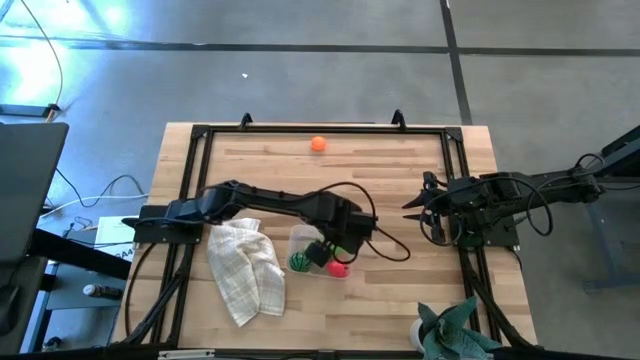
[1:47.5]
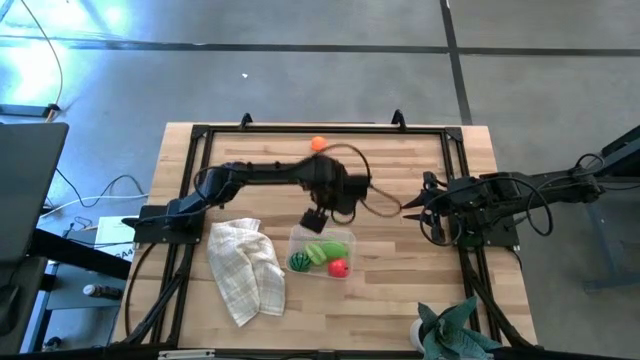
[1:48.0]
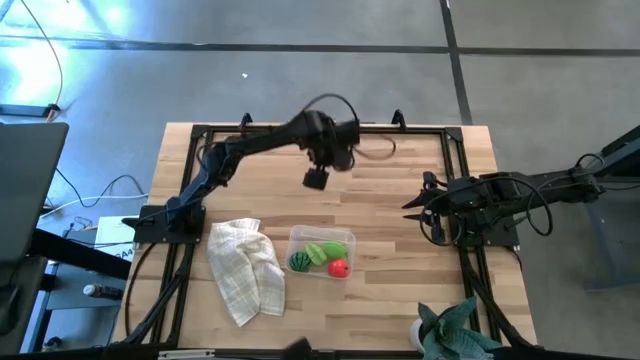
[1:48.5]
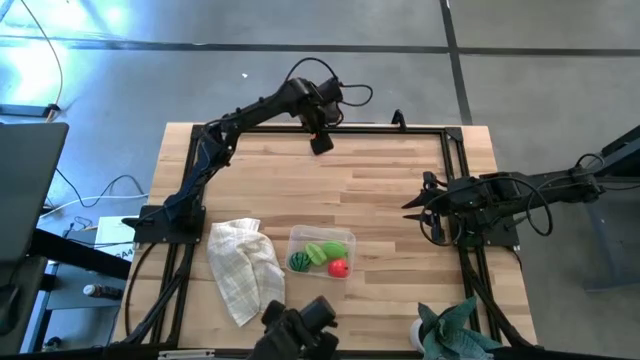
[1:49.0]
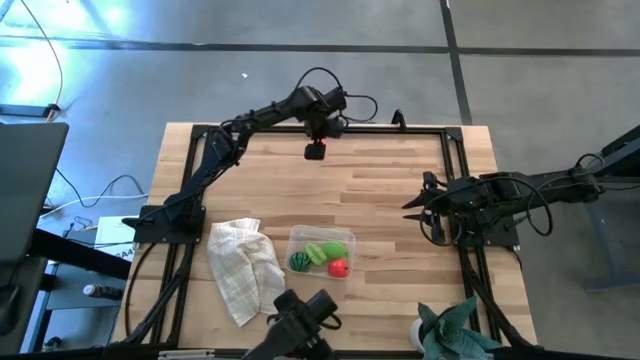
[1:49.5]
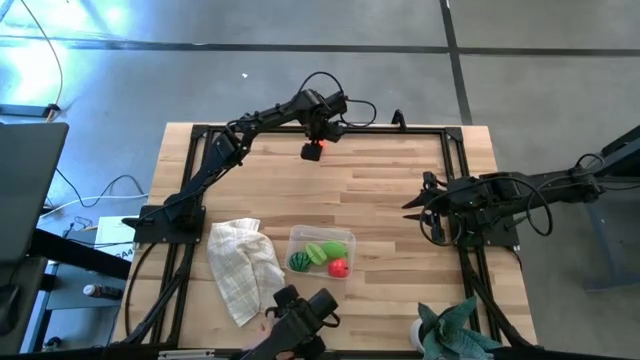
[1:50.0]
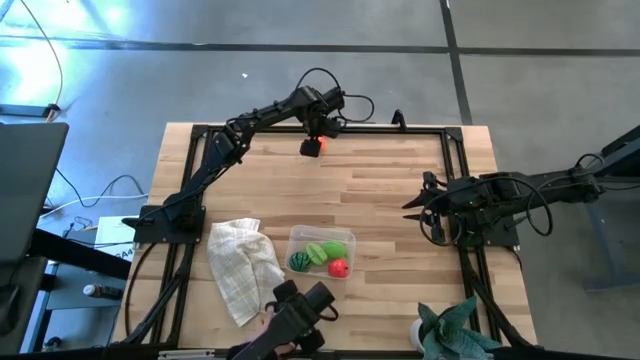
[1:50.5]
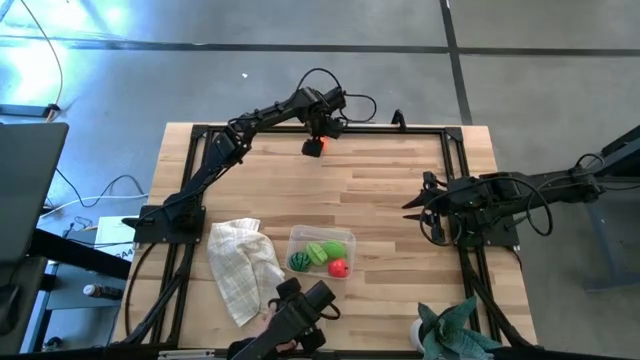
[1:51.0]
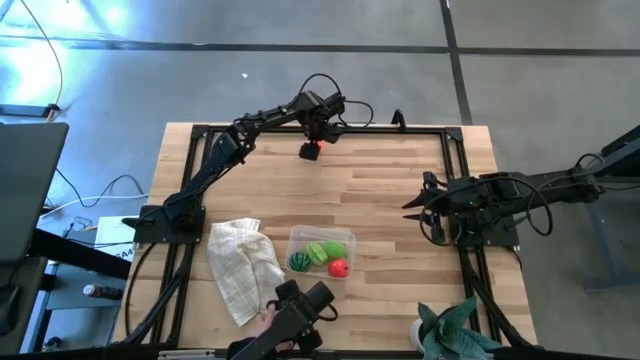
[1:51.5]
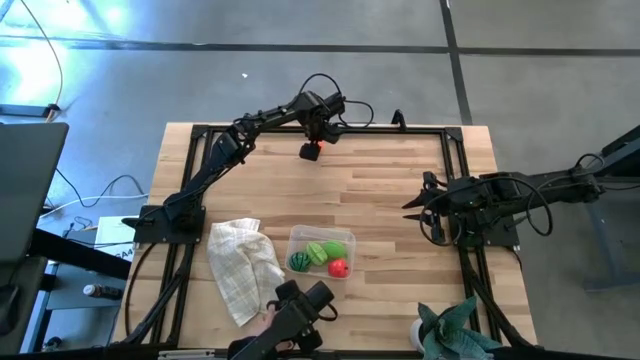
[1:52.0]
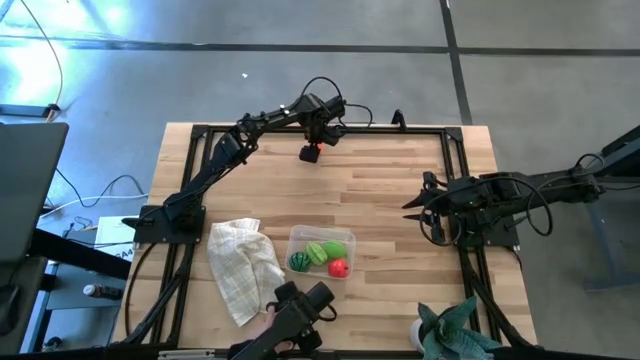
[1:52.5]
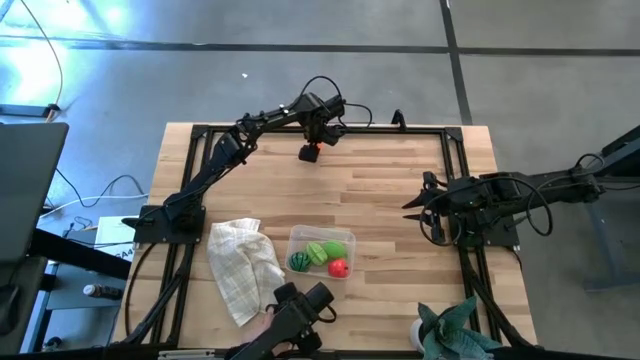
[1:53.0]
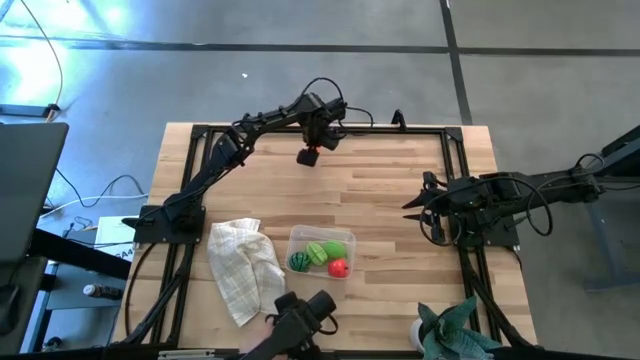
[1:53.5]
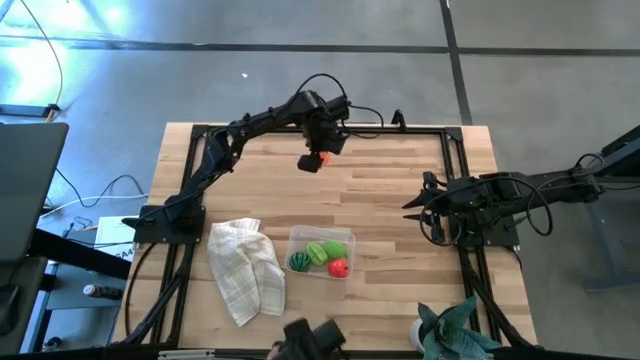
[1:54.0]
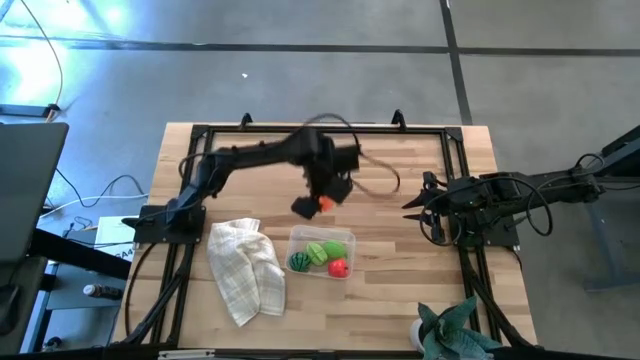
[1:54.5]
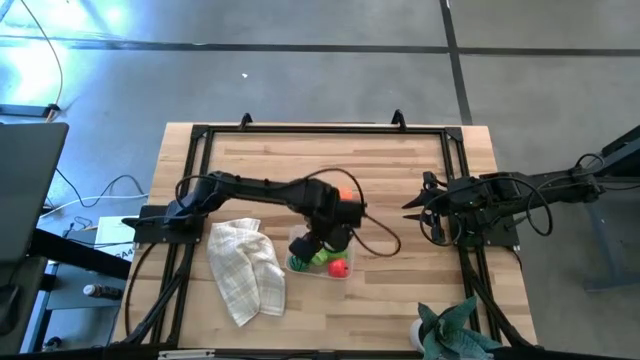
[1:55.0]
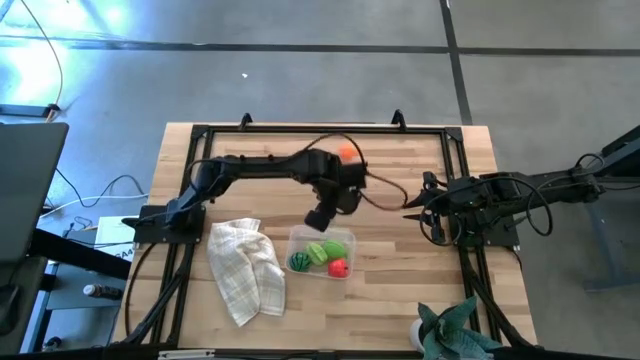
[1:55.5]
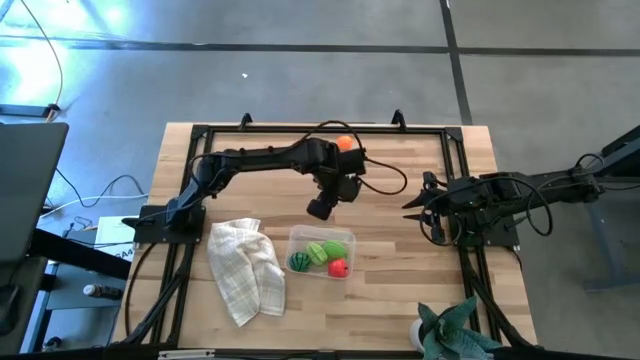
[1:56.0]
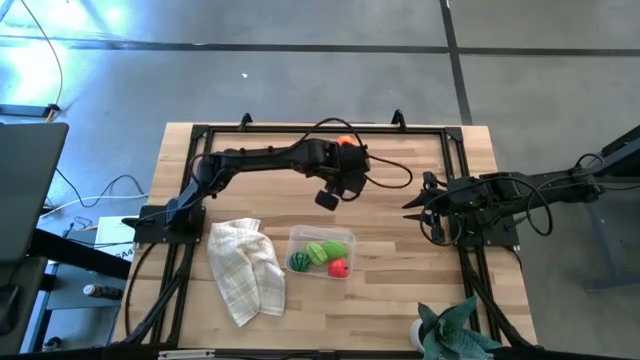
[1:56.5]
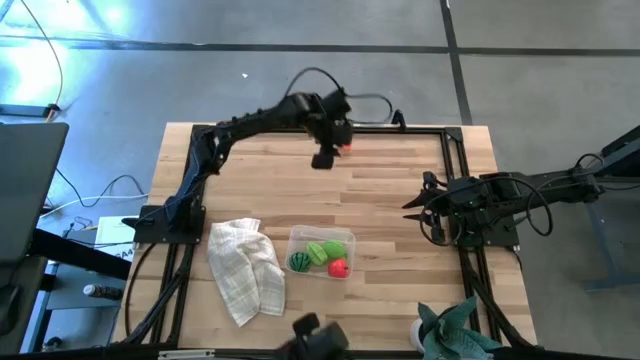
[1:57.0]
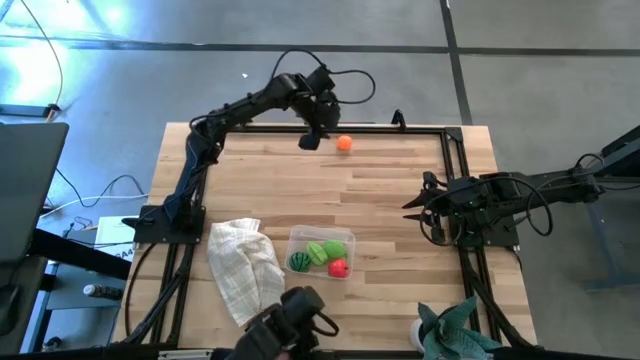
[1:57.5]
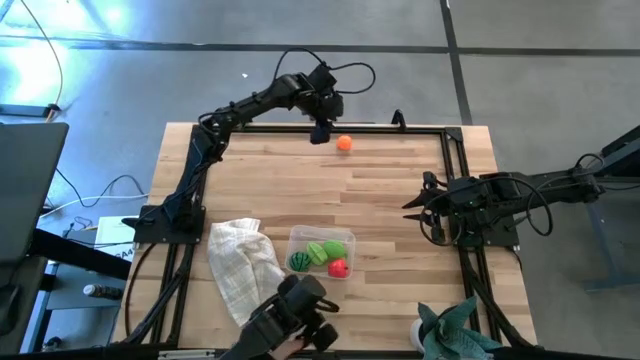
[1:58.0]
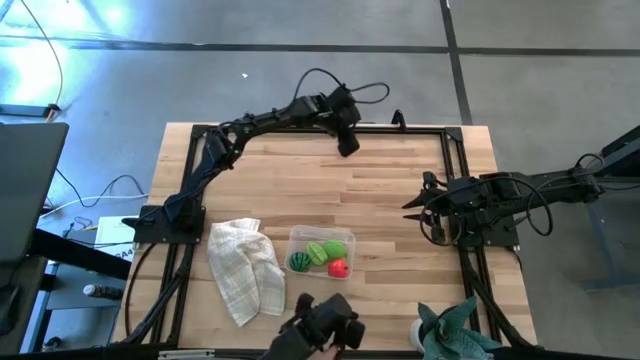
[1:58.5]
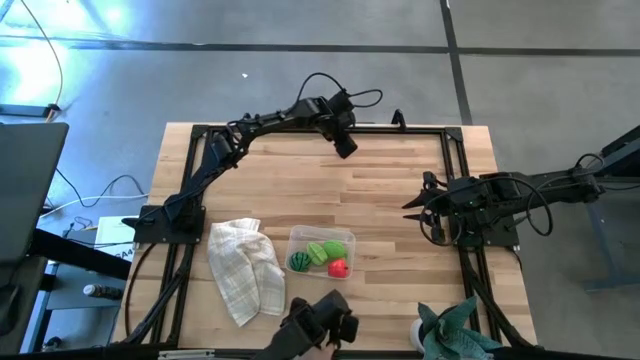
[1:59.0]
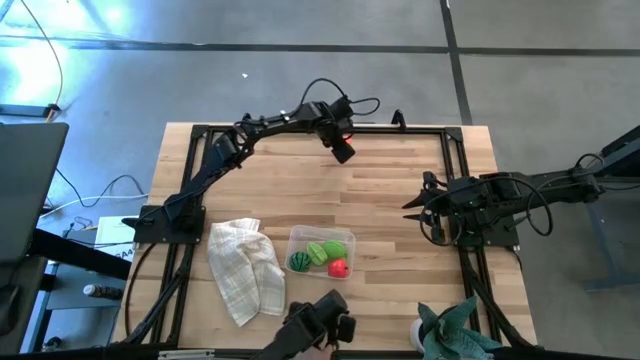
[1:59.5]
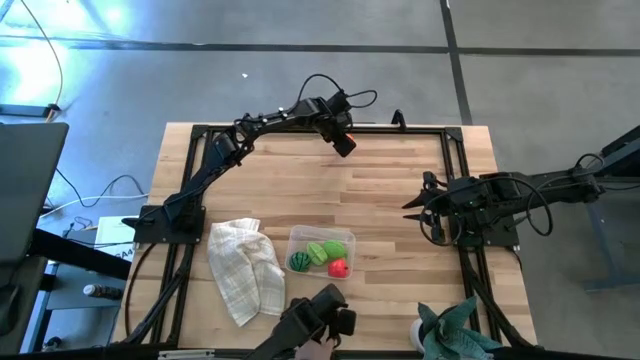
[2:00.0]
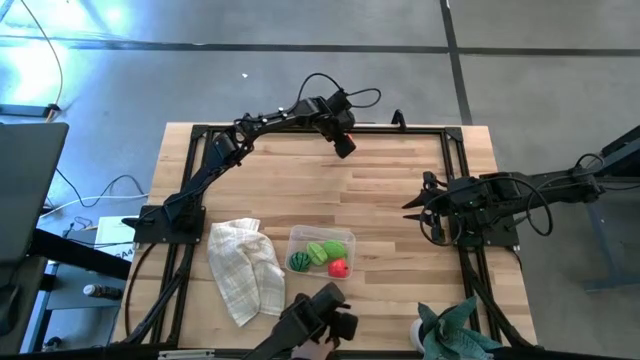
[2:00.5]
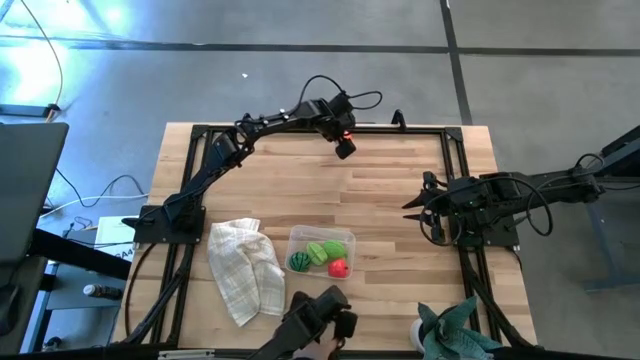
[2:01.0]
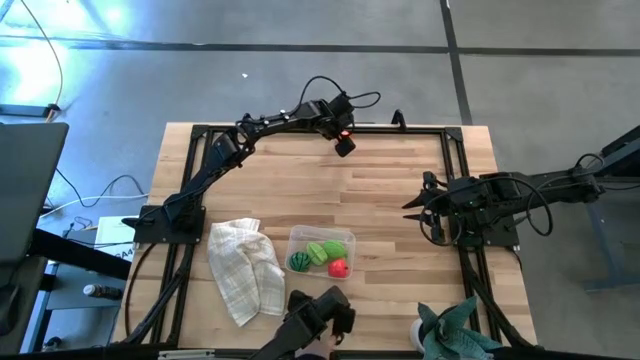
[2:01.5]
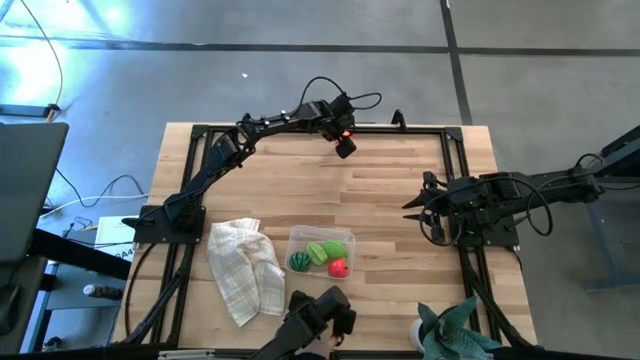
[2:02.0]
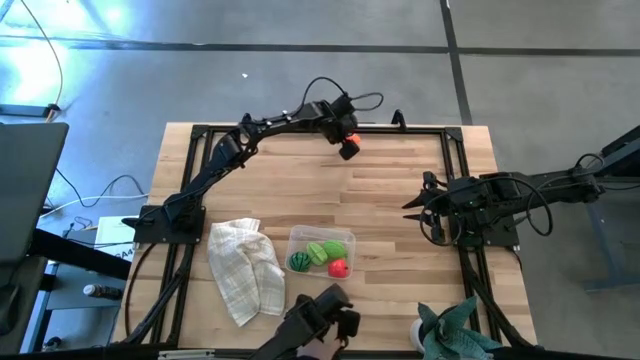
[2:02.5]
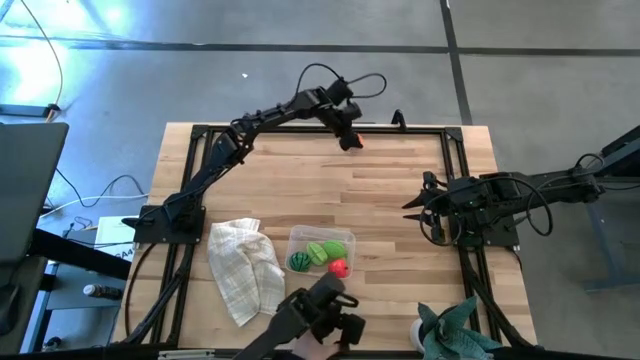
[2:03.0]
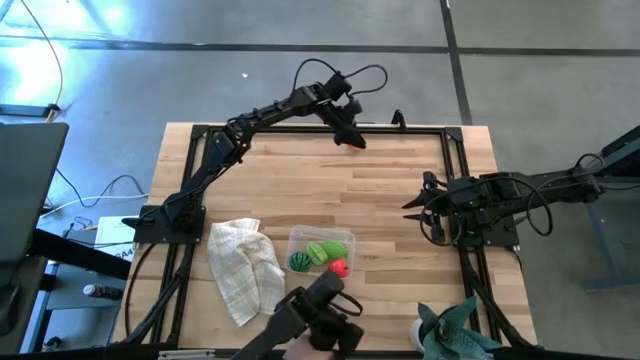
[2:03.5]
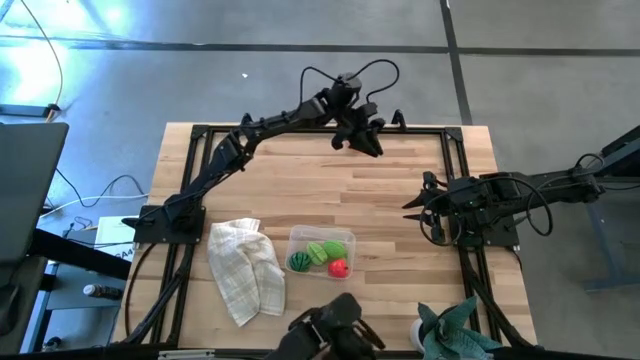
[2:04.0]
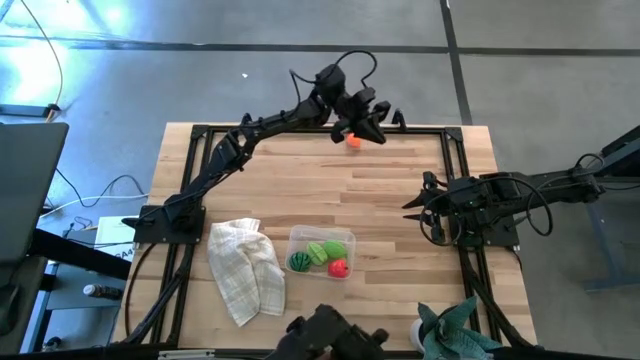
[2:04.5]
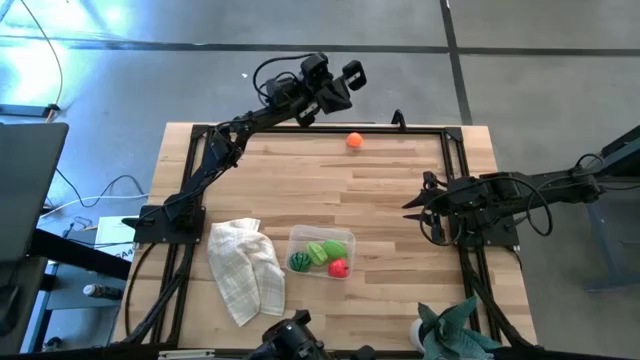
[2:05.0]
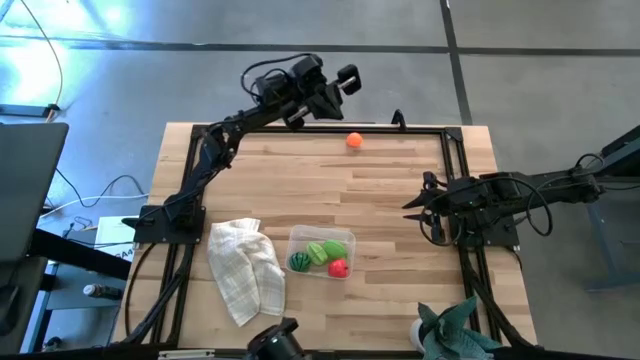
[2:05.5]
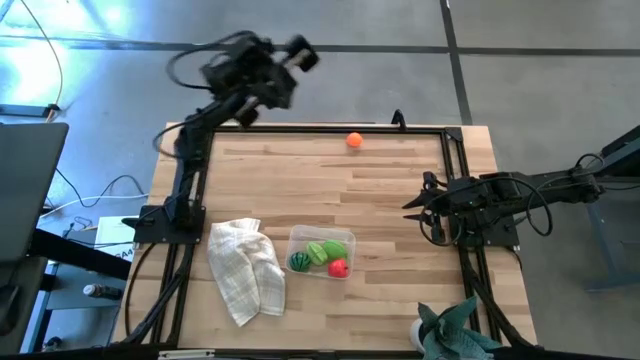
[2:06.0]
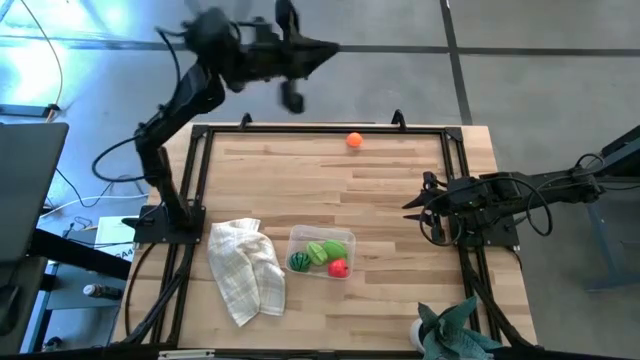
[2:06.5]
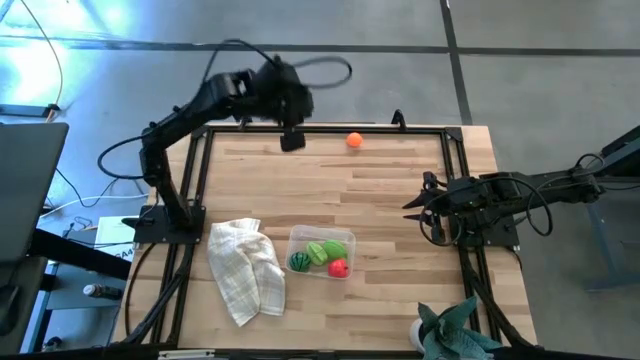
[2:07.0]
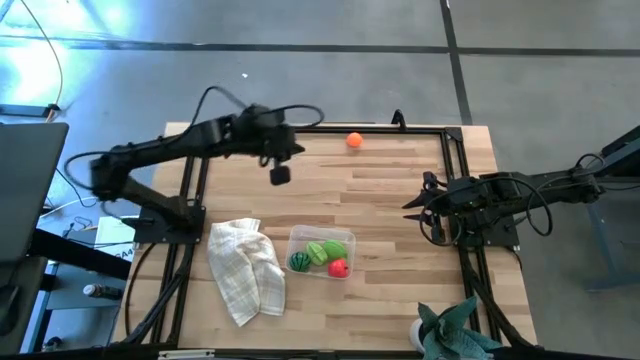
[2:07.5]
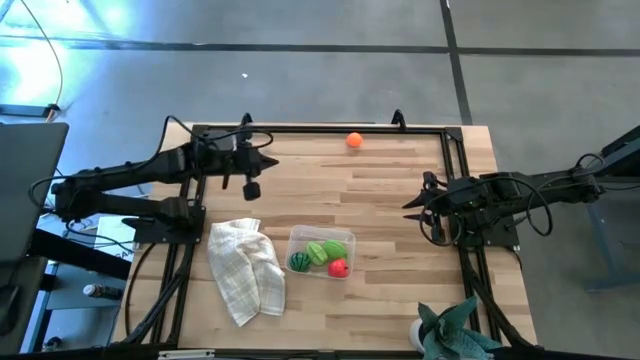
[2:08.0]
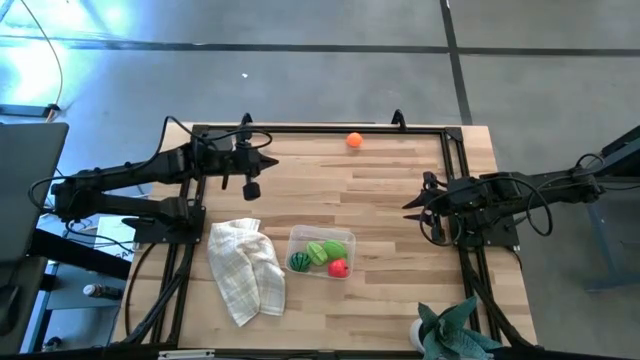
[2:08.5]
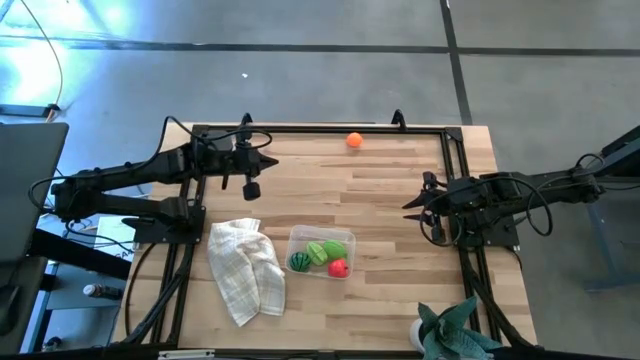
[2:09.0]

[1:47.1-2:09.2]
Task: Pick and placing Produce into tupperware
Put the orange tangerine into the transparent bin
